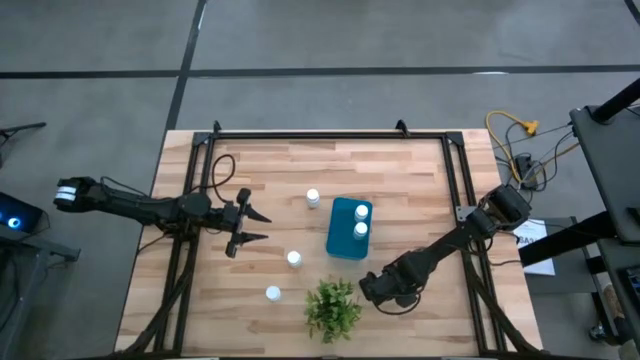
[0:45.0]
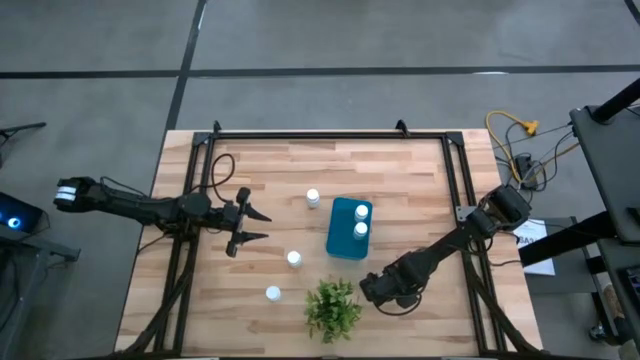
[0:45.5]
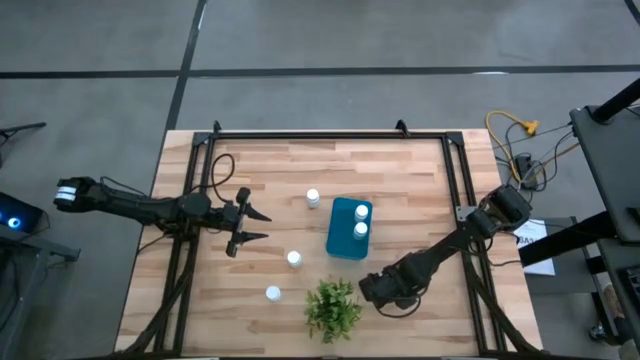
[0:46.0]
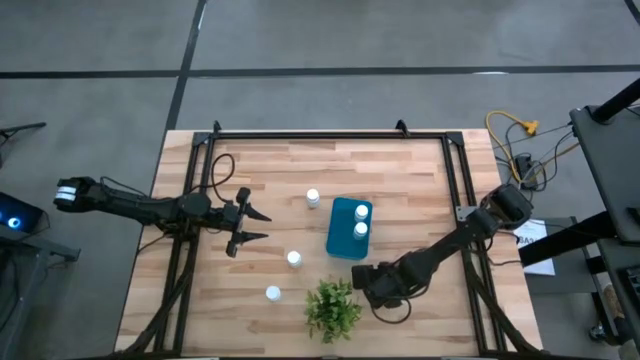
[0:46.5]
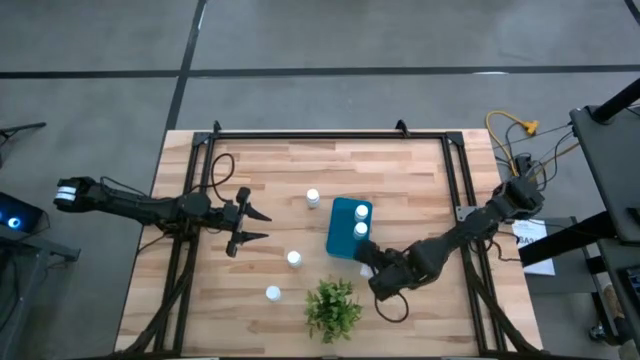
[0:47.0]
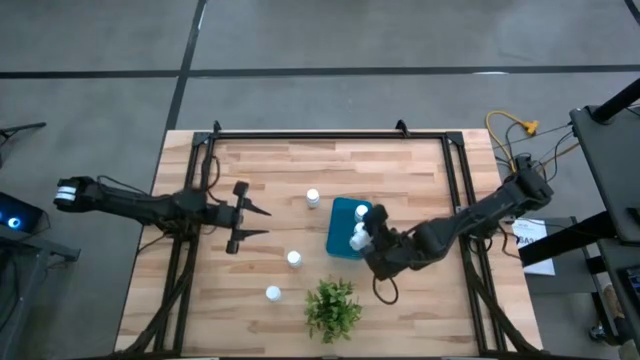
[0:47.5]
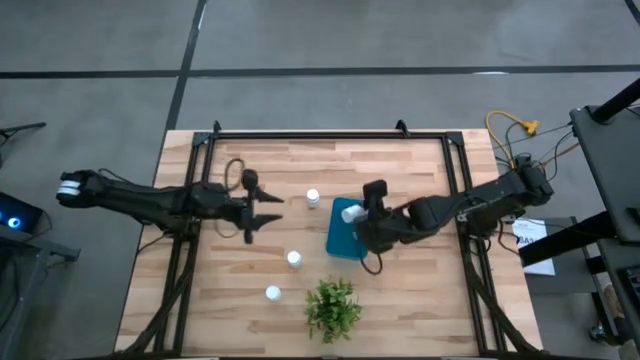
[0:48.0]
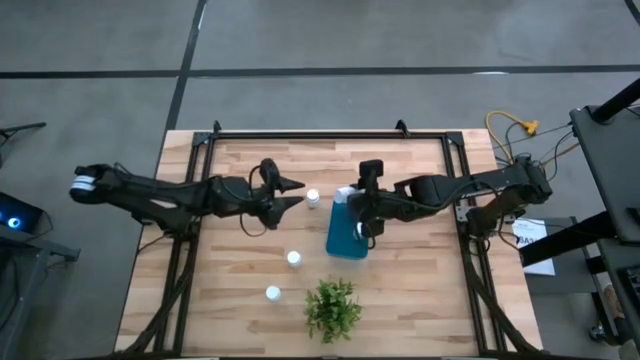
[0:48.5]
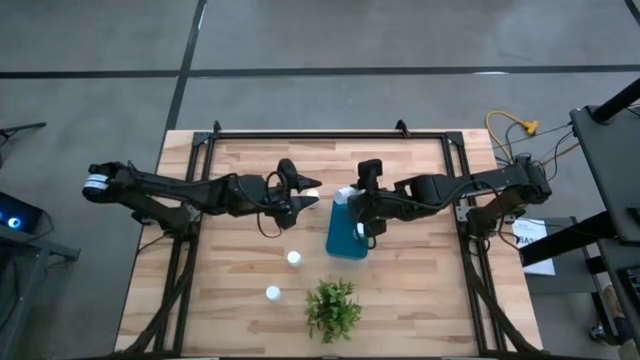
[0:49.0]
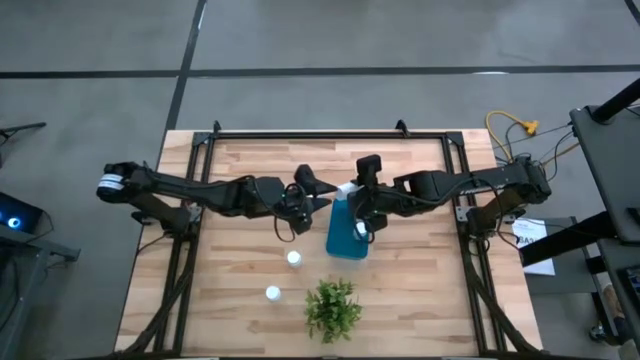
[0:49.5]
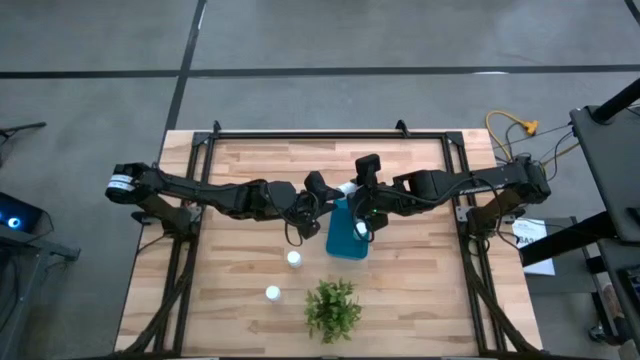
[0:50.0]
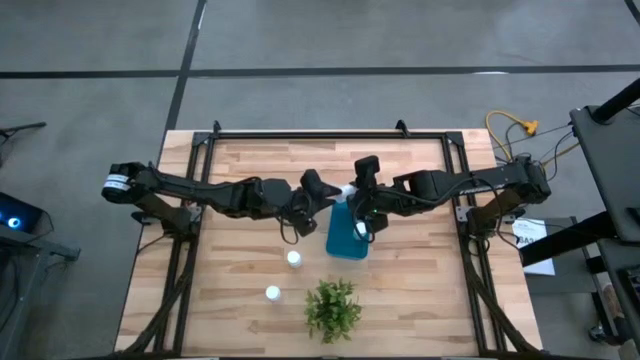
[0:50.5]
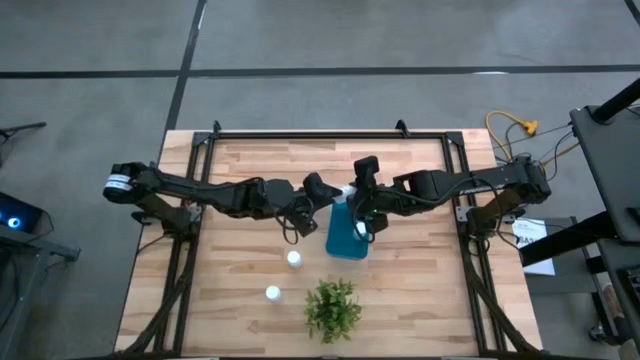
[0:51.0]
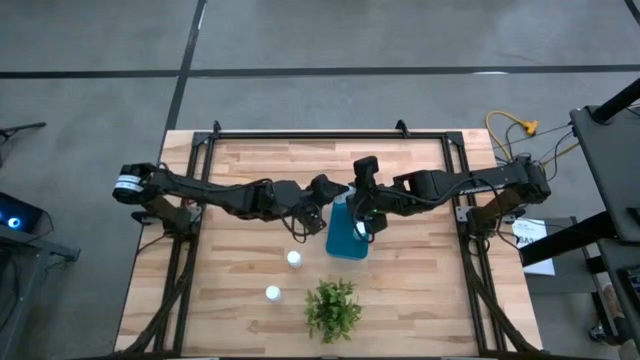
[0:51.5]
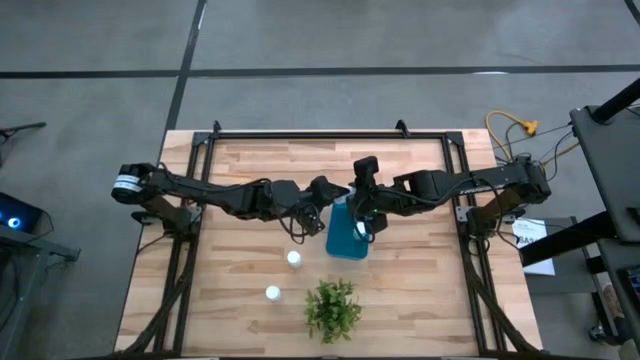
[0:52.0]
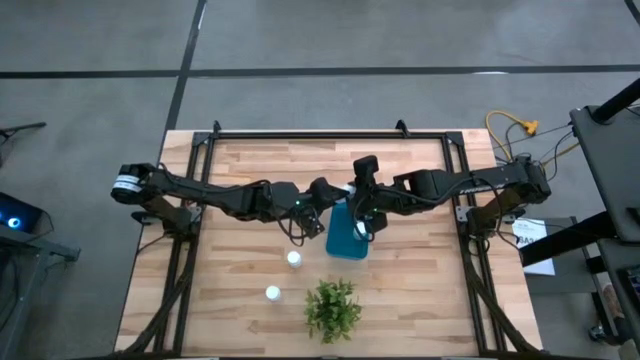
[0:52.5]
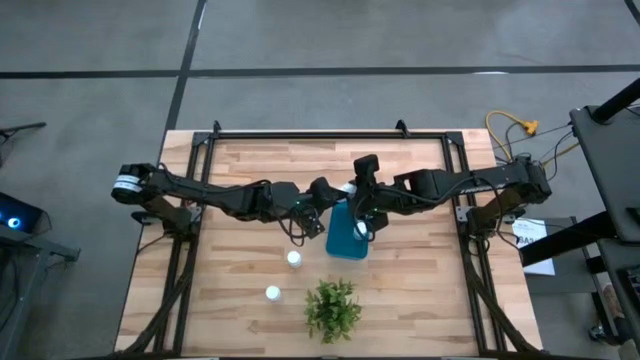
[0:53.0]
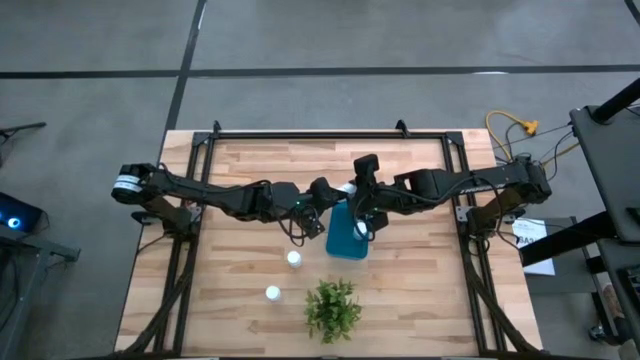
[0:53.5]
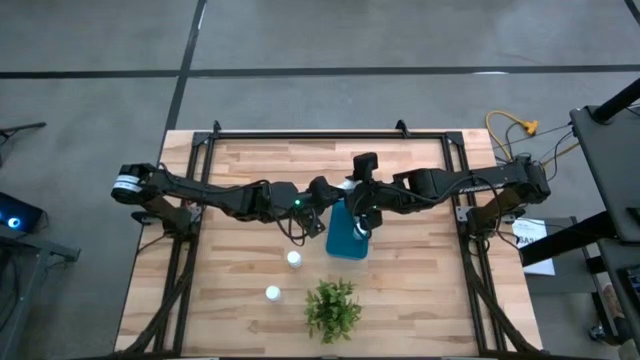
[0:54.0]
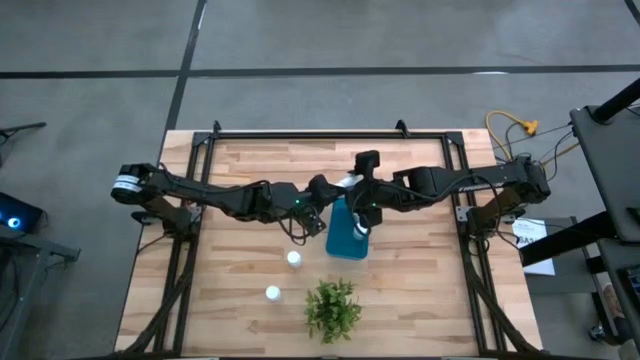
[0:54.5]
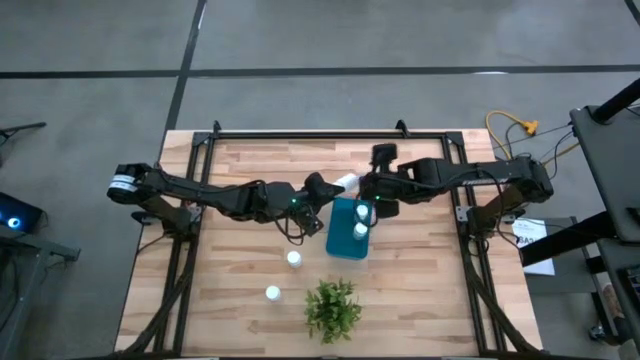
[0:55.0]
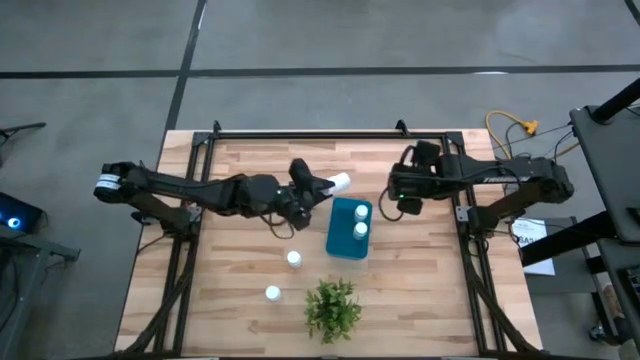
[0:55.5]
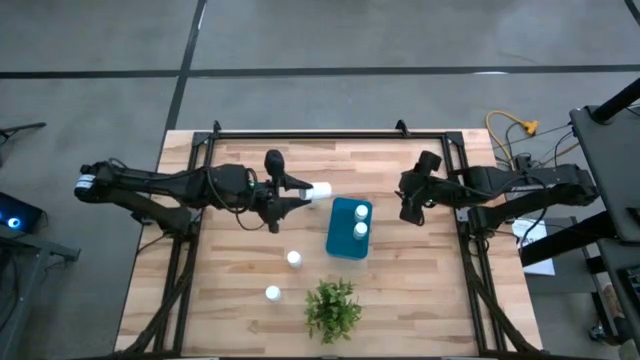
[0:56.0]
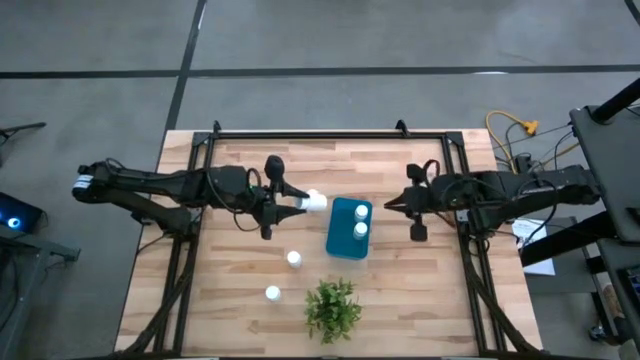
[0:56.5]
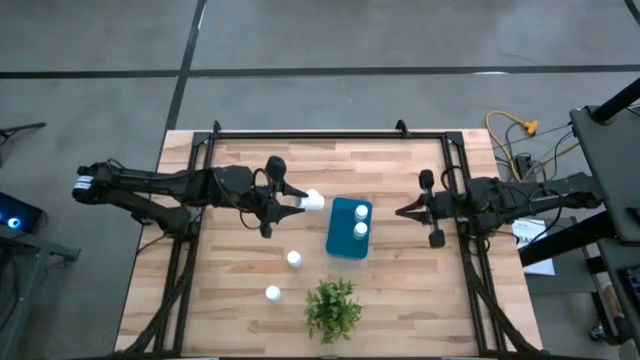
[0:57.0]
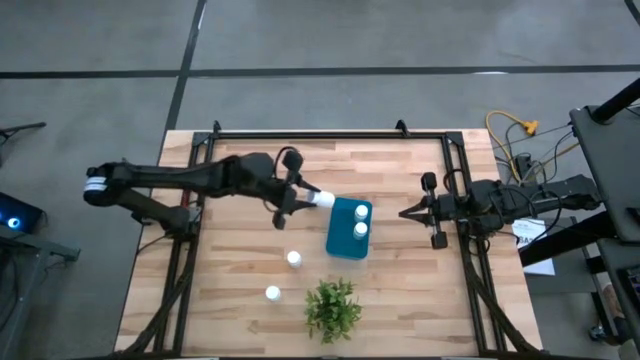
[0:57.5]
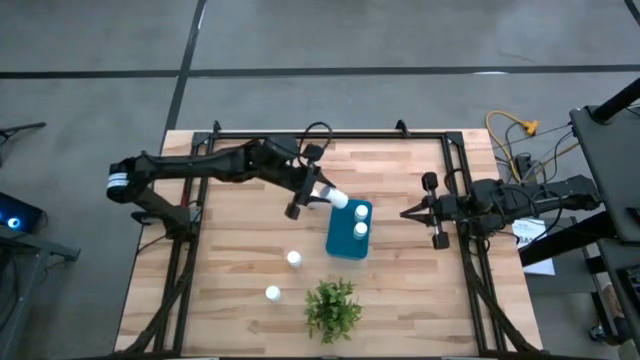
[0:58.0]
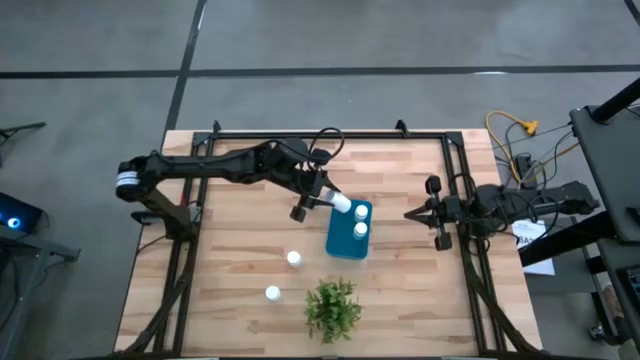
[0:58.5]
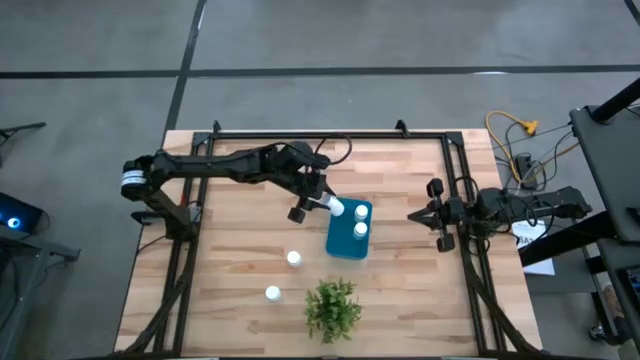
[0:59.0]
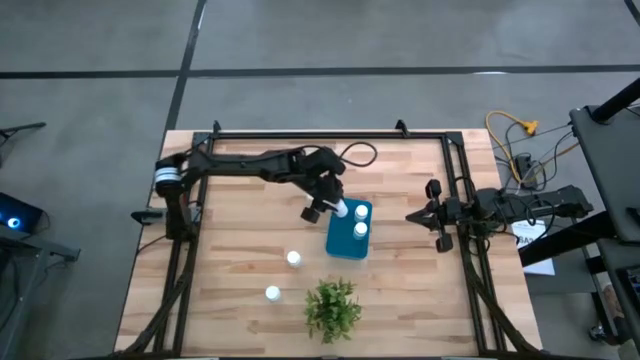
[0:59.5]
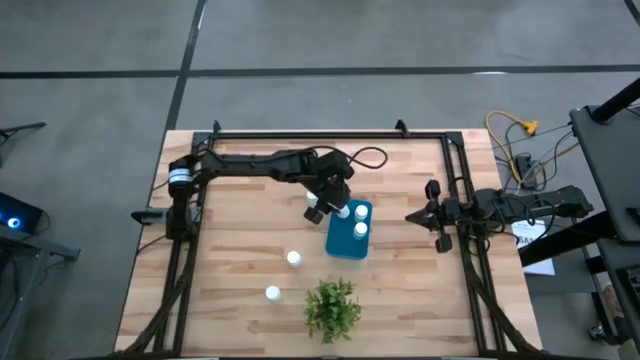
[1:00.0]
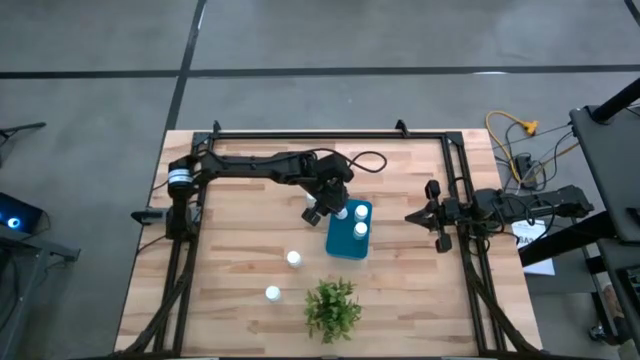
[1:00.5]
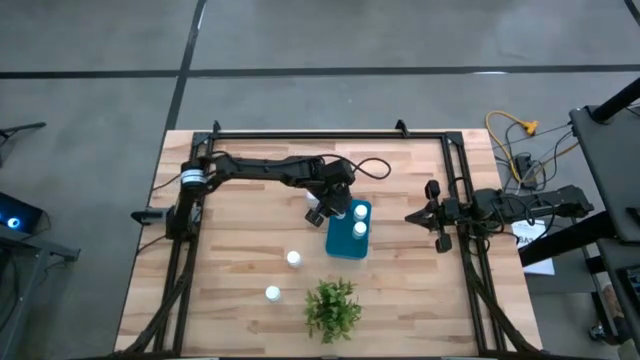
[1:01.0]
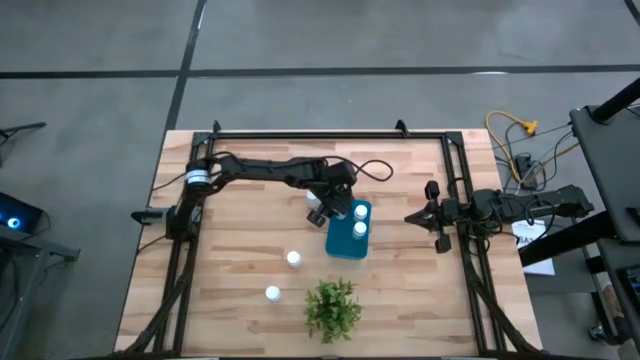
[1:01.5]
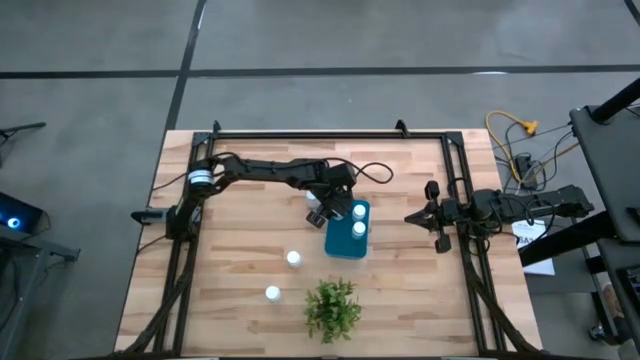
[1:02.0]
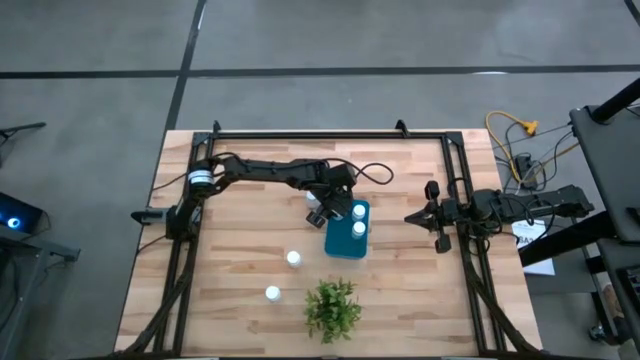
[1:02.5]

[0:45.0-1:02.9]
Task: Pick and place pill bottles into a basket
Put the white pill bottle into the blue bin

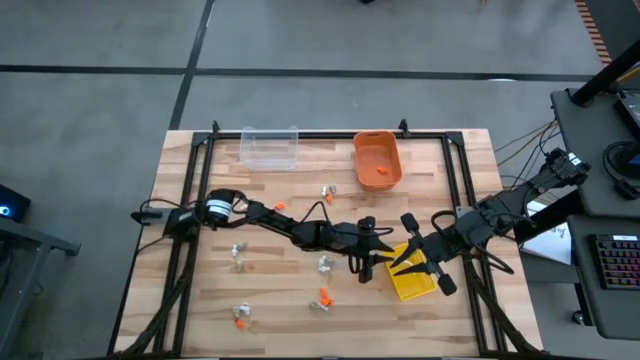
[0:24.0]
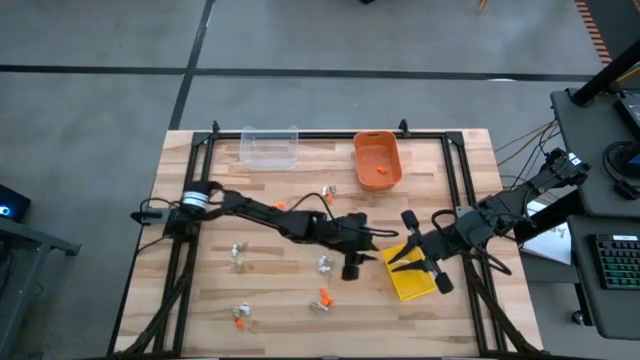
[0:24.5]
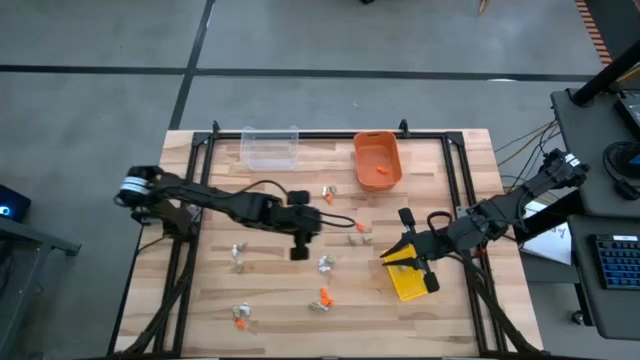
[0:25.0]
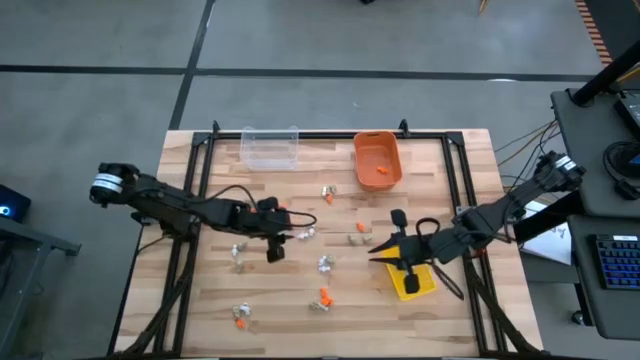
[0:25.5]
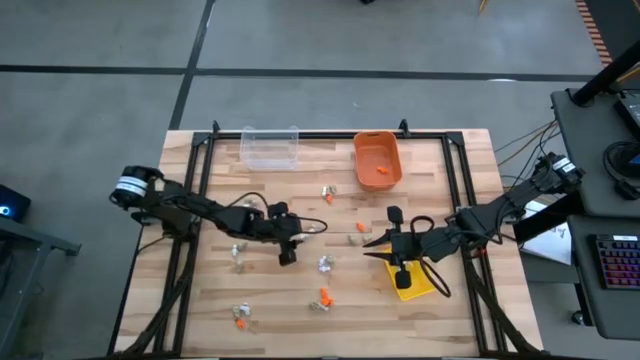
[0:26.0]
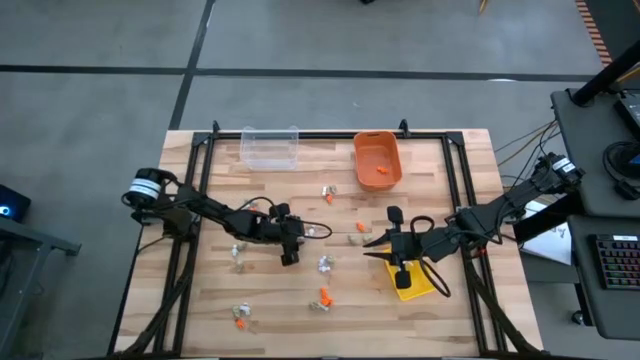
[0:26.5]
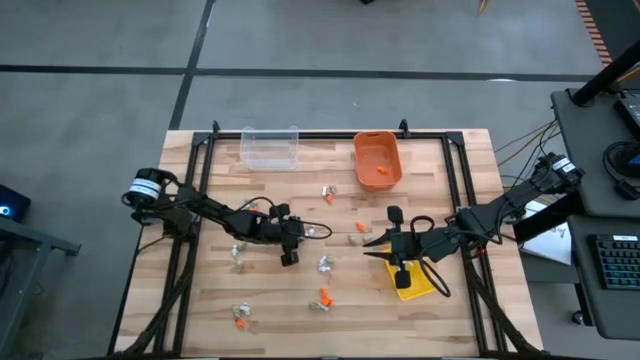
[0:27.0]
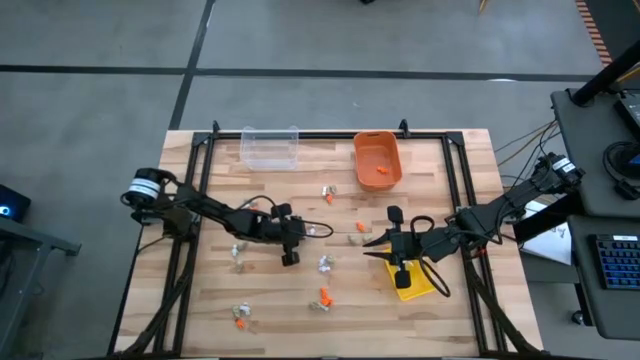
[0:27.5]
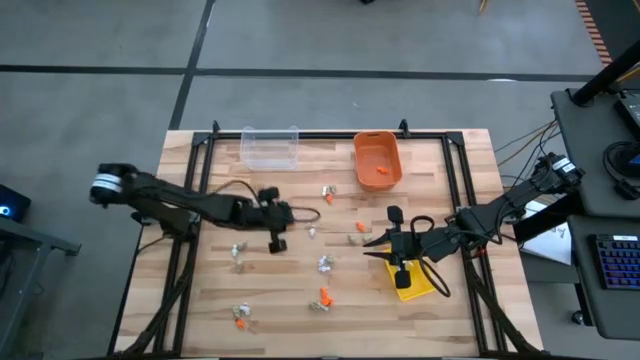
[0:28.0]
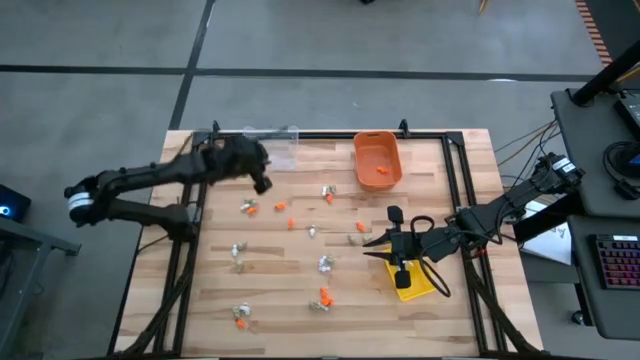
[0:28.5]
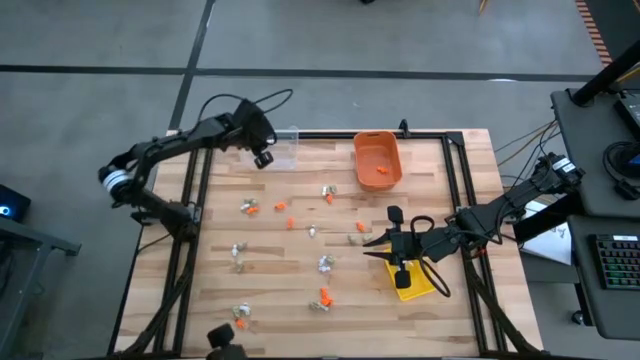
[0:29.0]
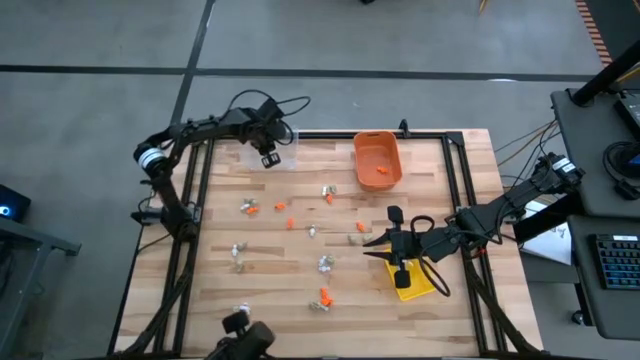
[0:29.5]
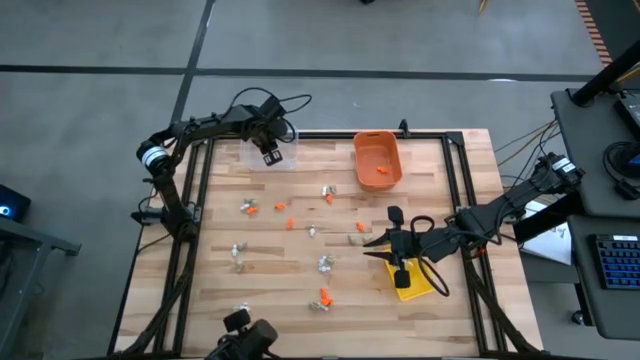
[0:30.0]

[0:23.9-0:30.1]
Task: Sort Halloween decoration
Put the white skeleton toy into the transparent bin
